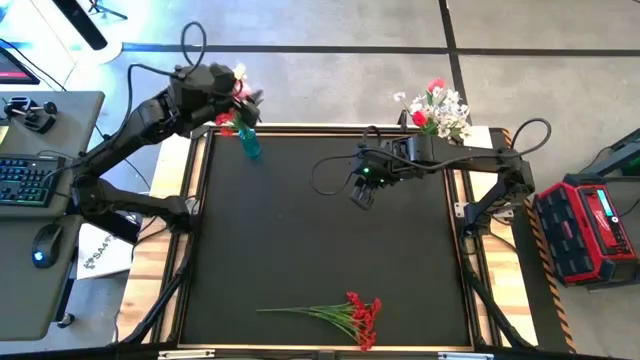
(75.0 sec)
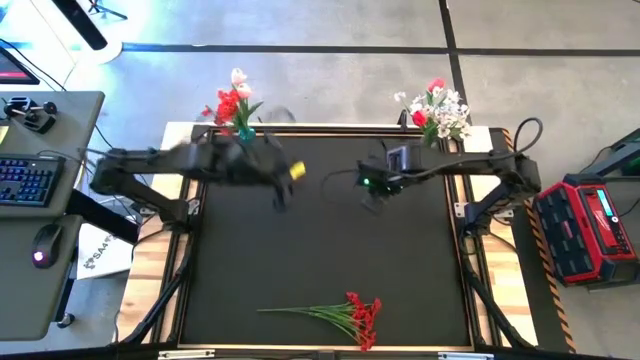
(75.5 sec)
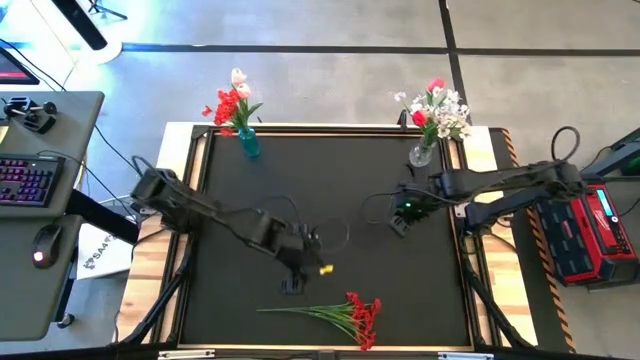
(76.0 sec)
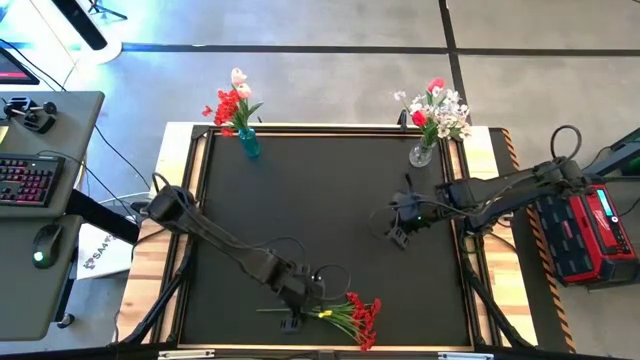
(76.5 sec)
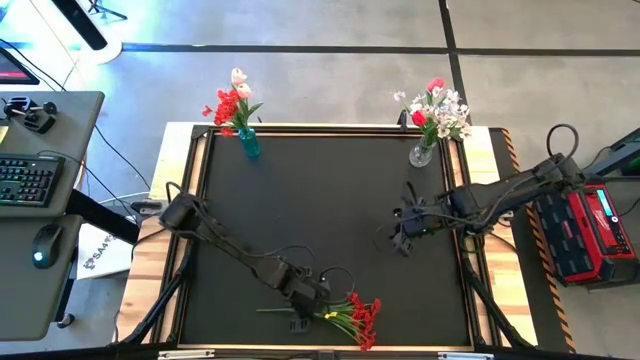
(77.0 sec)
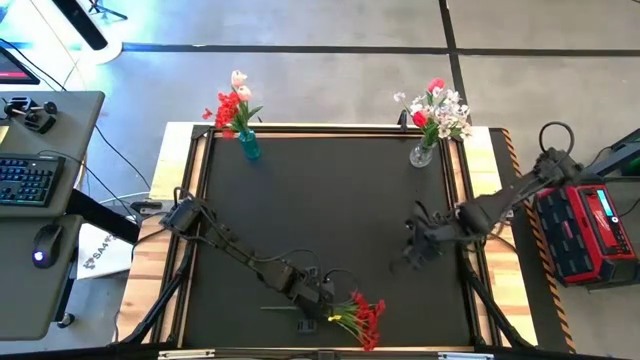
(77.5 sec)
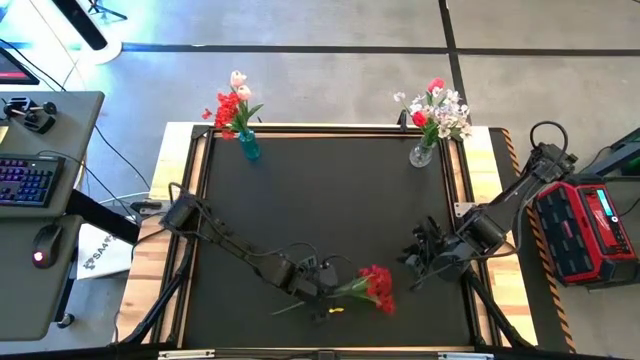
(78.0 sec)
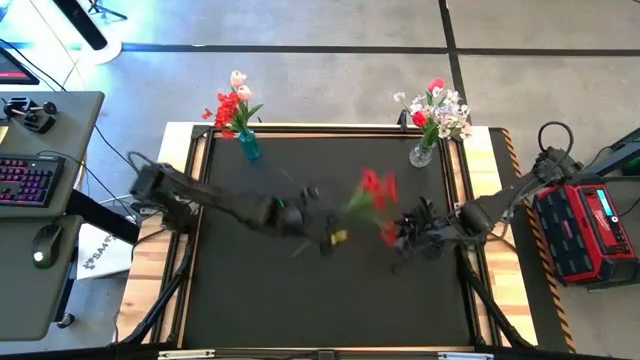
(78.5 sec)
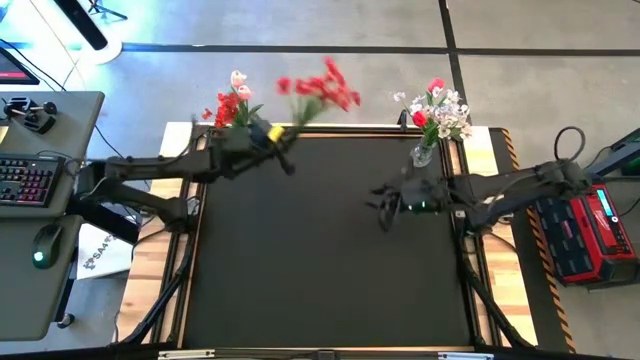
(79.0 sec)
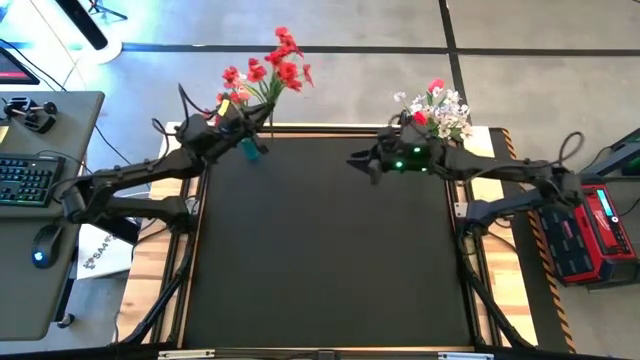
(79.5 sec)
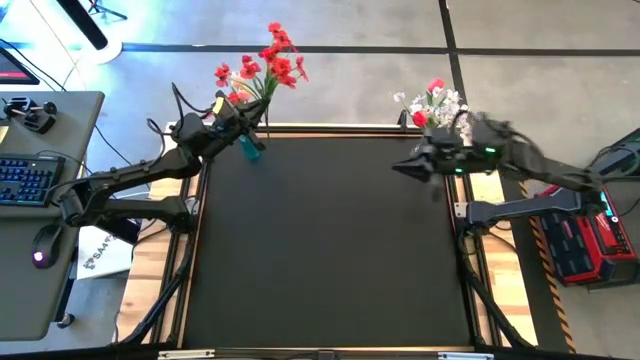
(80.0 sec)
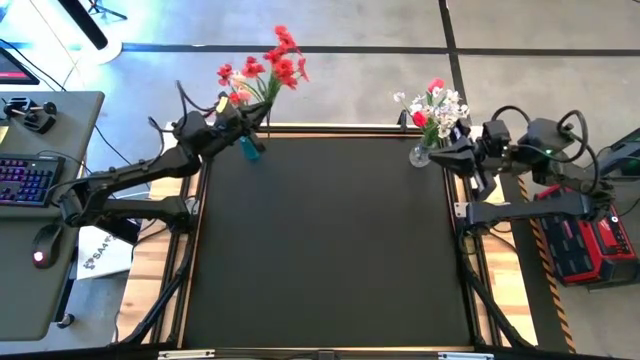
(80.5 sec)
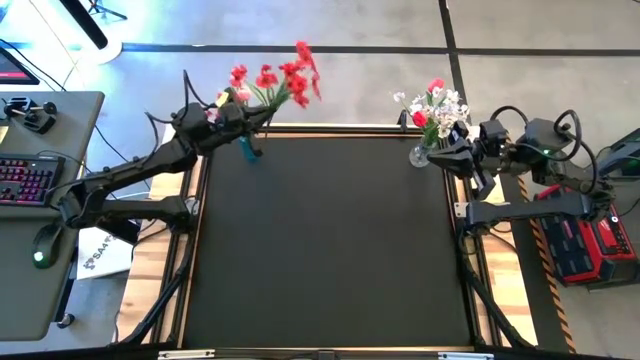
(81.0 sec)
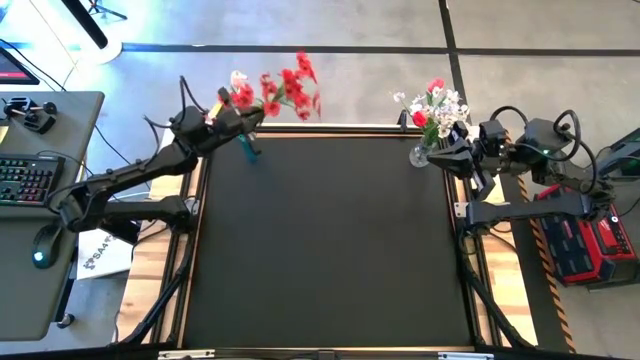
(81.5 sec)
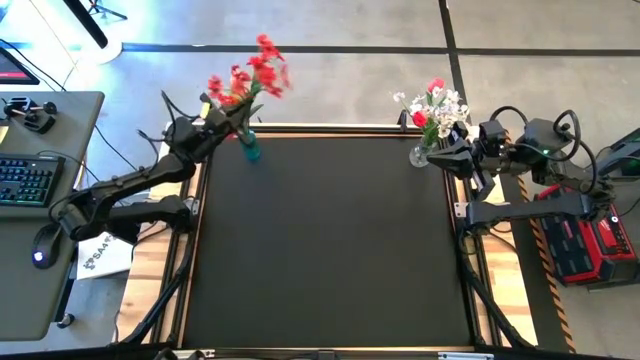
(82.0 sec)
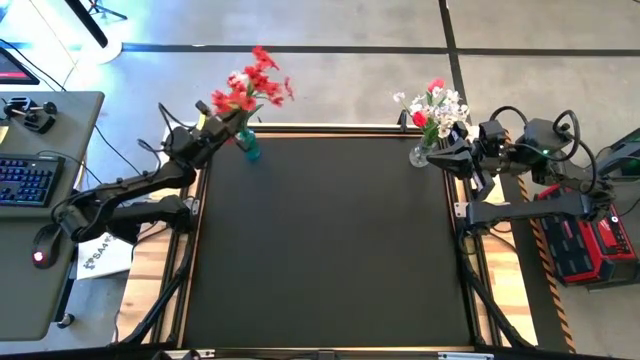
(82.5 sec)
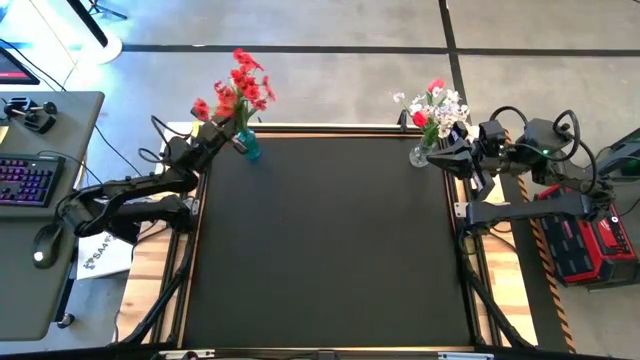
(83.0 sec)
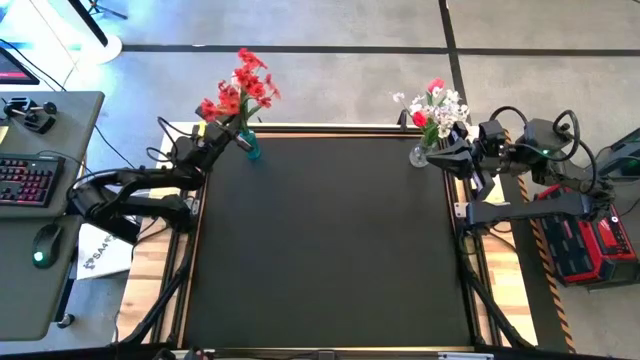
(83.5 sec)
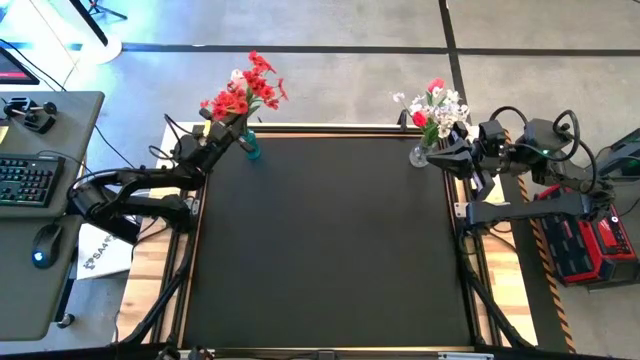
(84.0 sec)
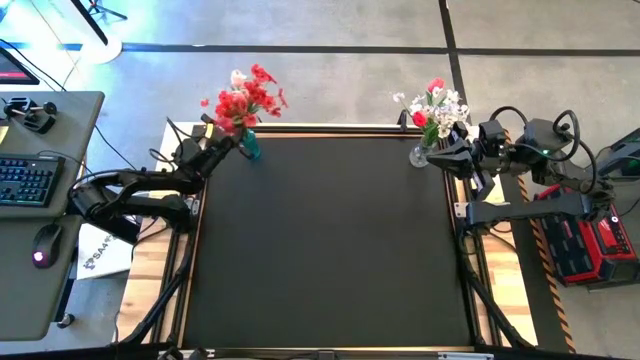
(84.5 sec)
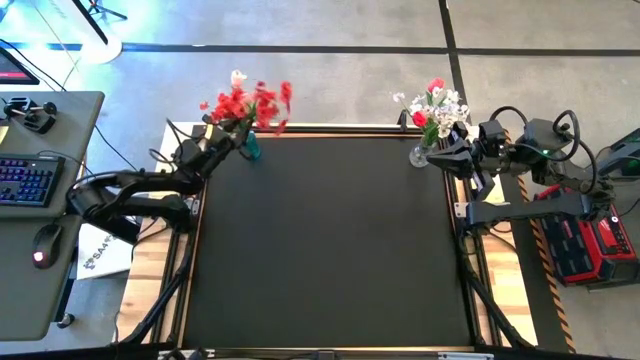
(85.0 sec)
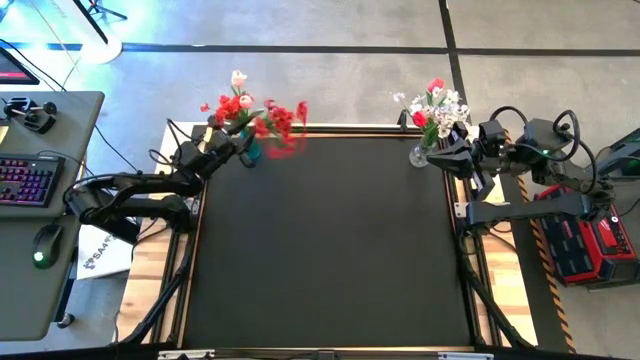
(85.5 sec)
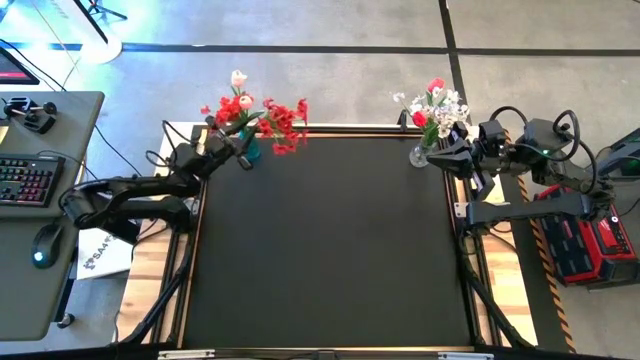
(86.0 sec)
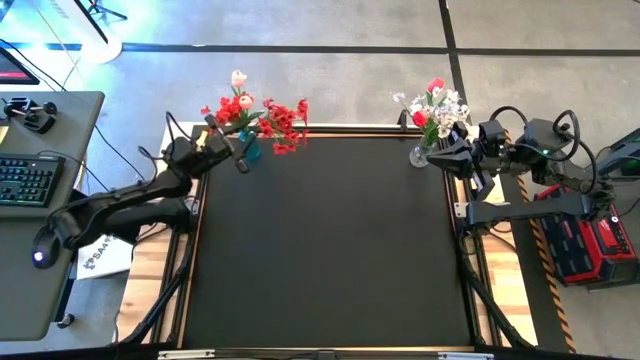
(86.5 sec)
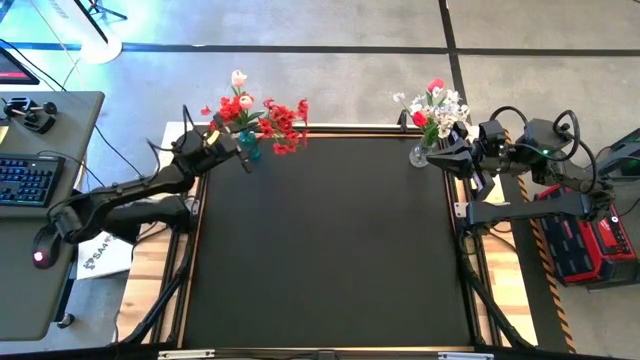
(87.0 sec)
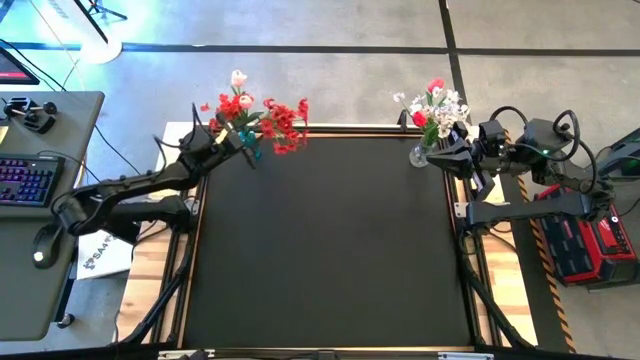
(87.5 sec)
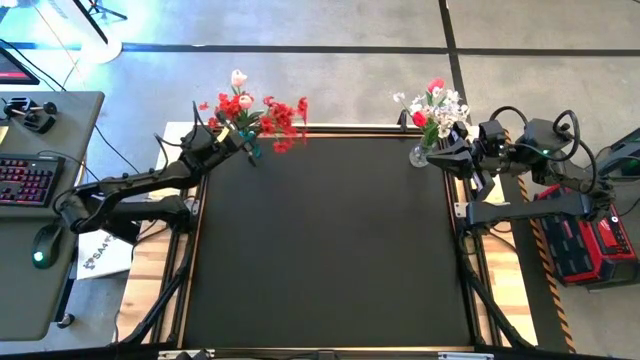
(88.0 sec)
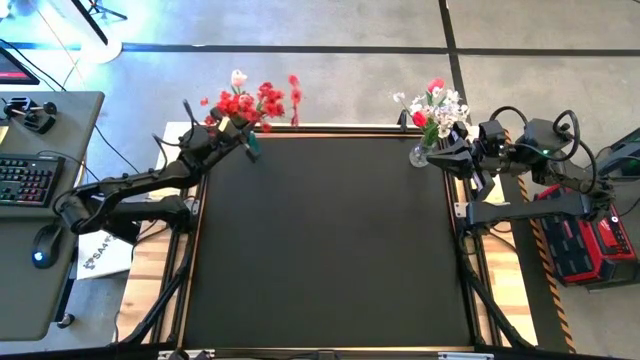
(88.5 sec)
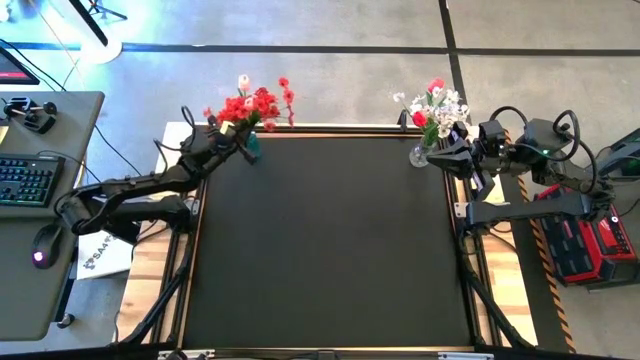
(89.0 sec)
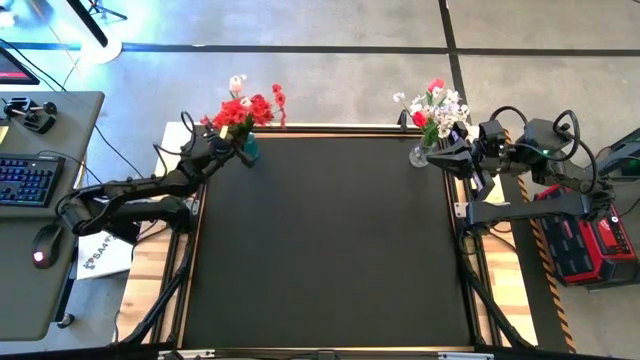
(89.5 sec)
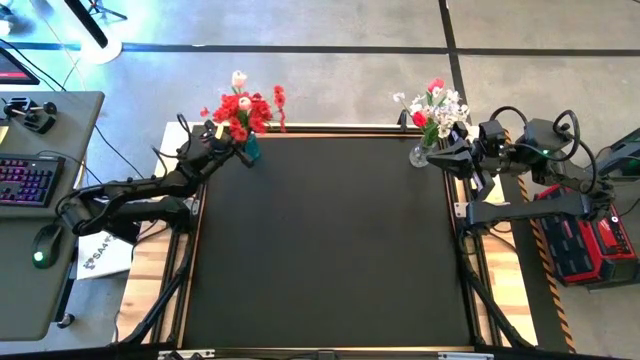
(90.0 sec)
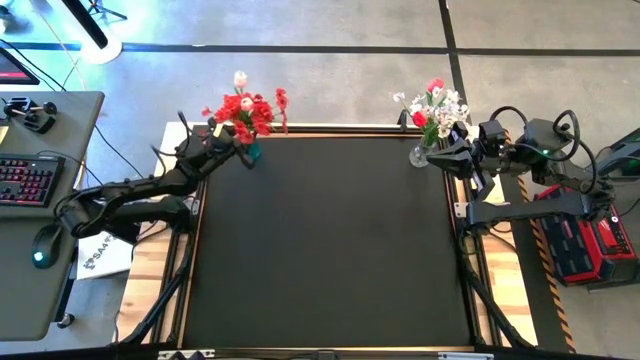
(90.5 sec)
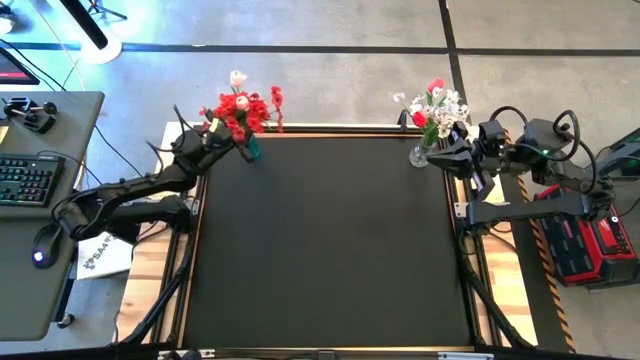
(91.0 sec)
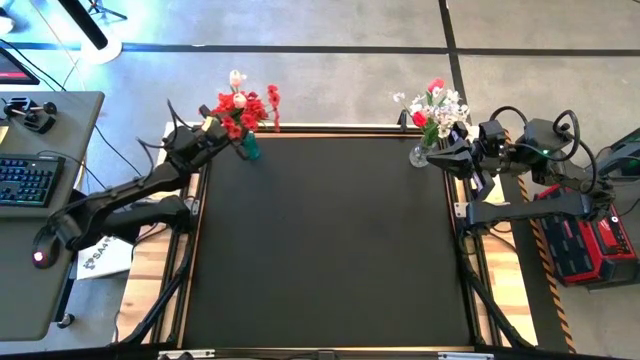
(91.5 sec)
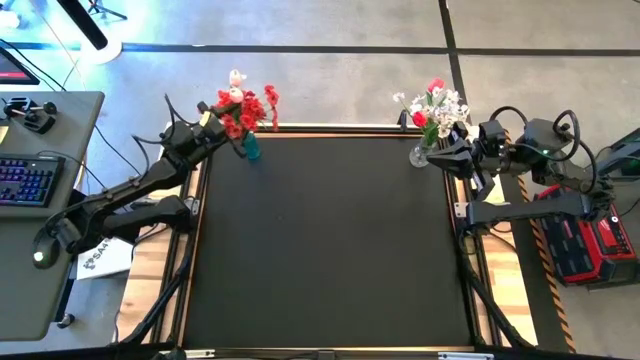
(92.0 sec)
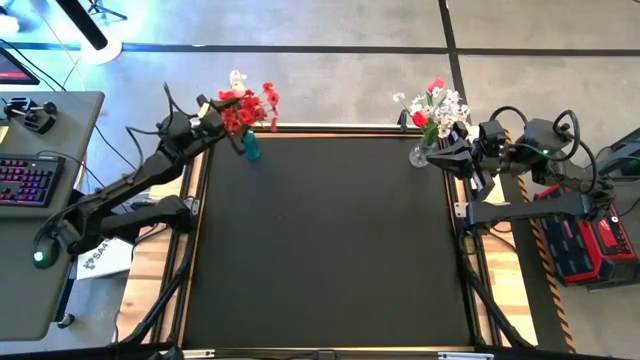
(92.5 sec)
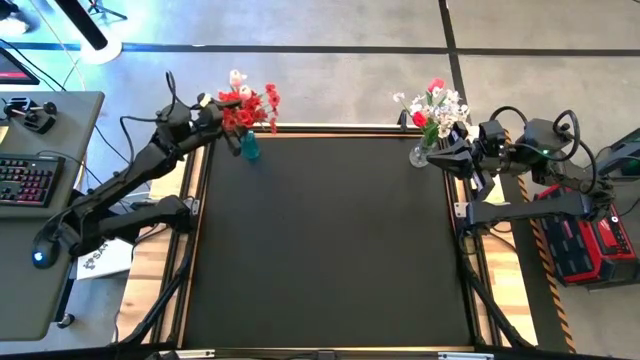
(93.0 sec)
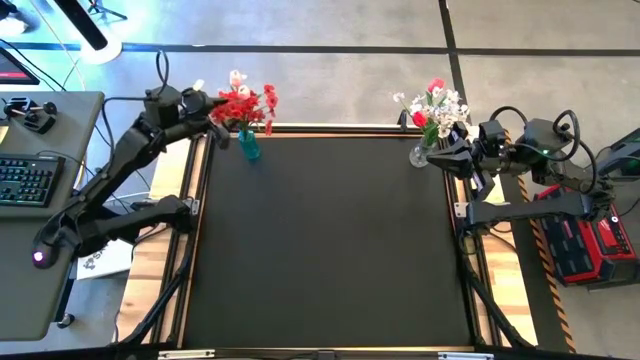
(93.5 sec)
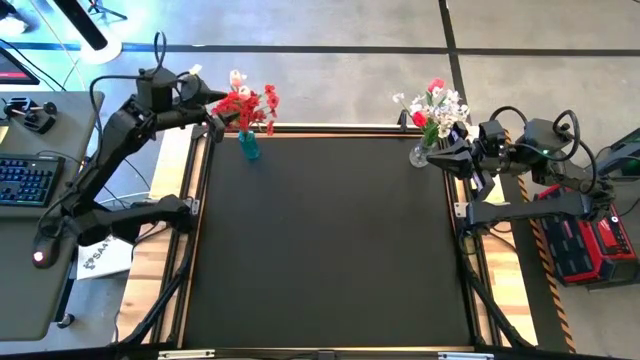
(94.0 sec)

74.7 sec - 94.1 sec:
Task: Sort flowers into vase by color
Put the red flowers into the blue vase

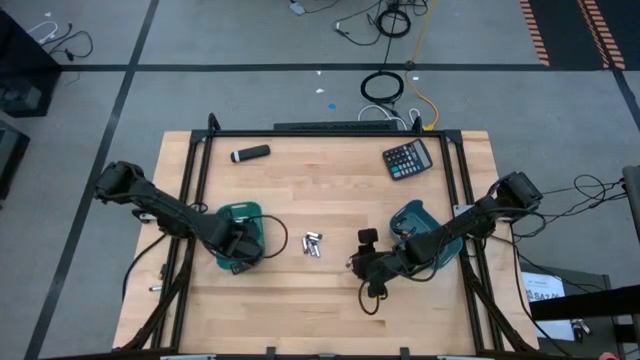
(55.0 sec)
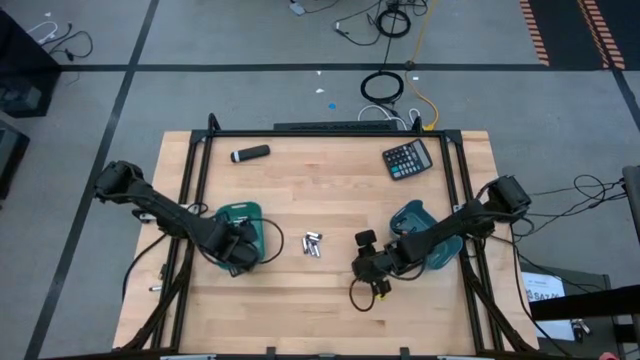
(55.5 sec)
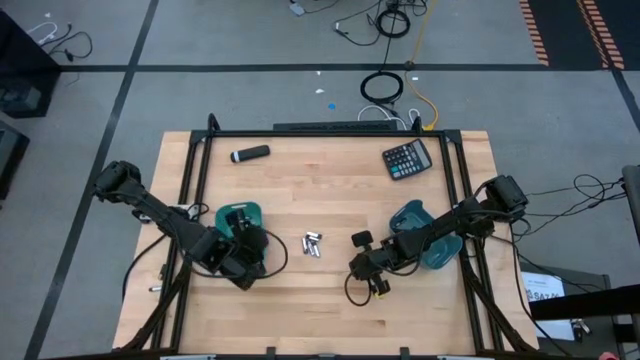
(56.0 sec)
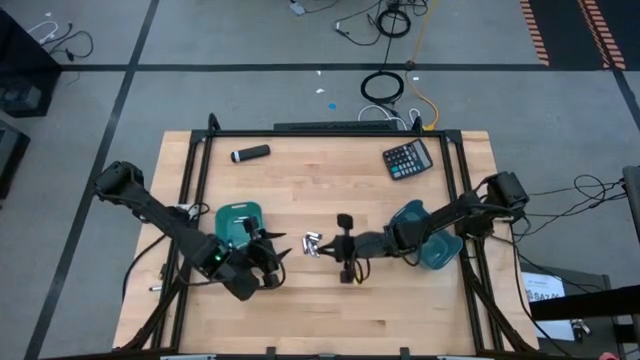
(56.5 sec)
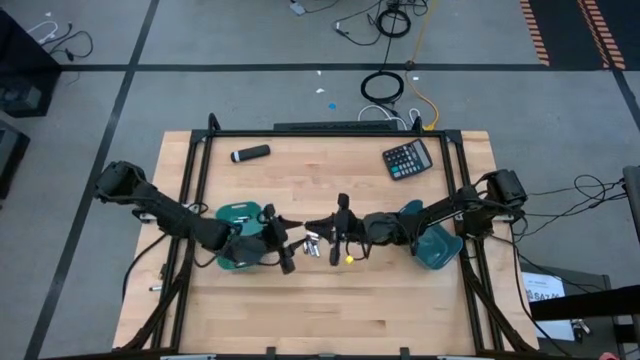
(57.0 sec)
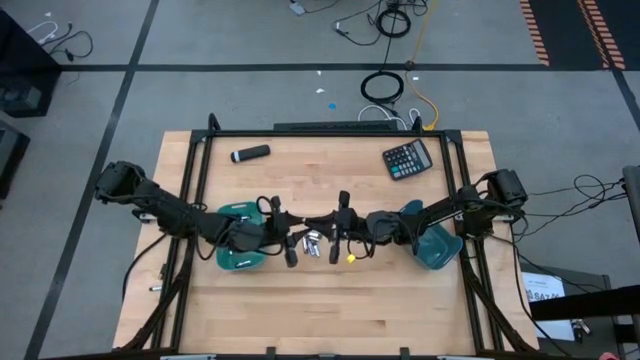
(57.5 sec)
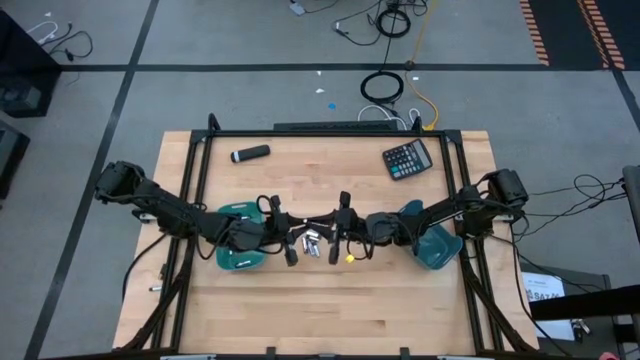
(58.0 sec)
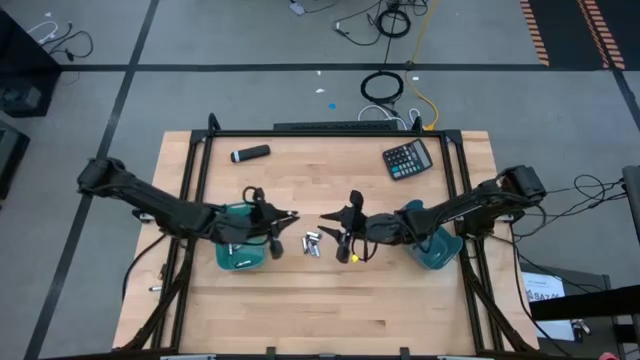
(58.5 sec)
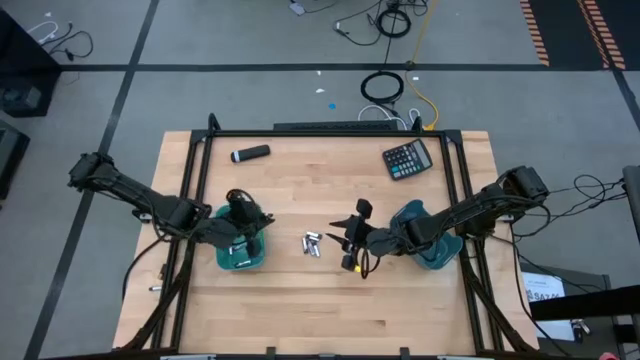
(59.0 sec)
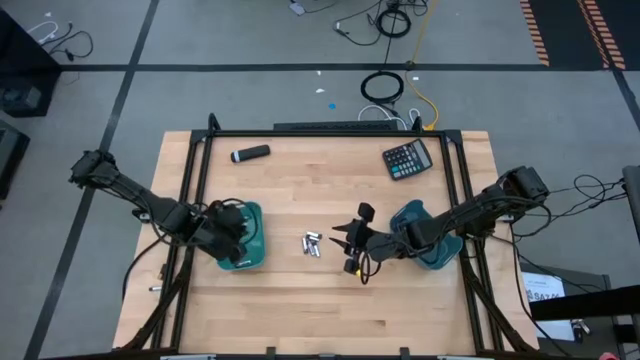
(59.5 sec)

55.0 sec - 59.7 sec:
Task: Sort batteries
Put the silver battery into the light blue bin
